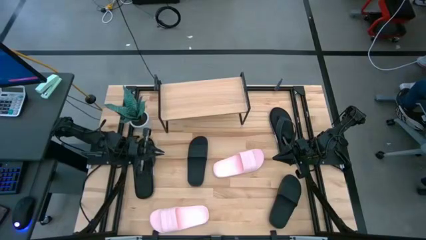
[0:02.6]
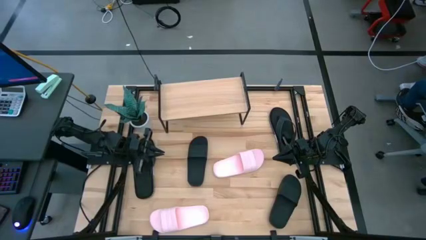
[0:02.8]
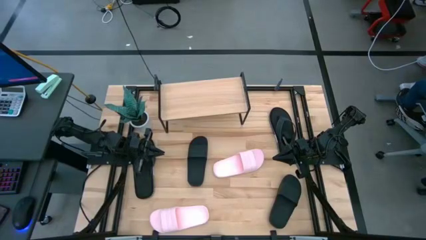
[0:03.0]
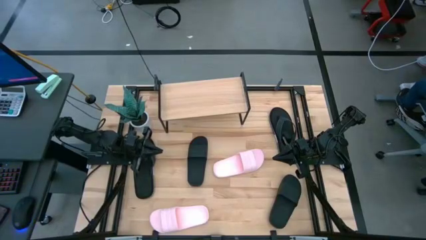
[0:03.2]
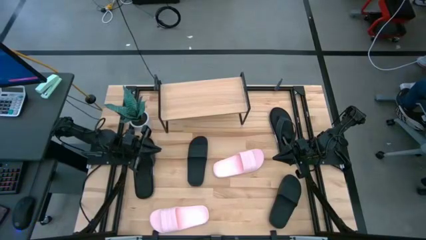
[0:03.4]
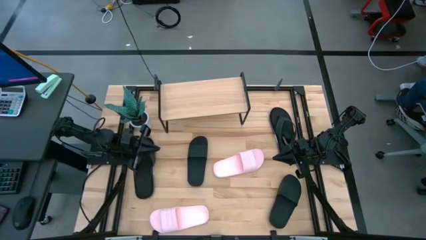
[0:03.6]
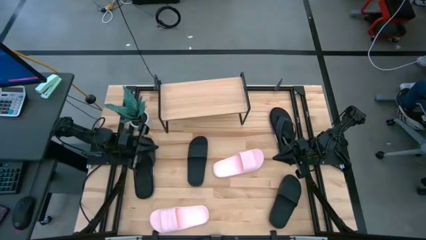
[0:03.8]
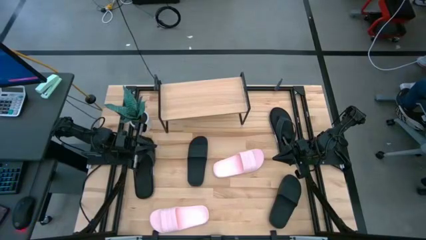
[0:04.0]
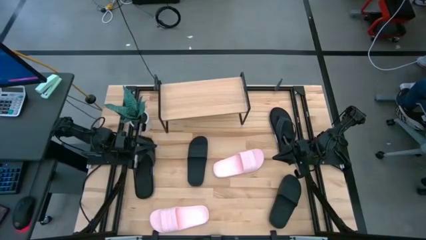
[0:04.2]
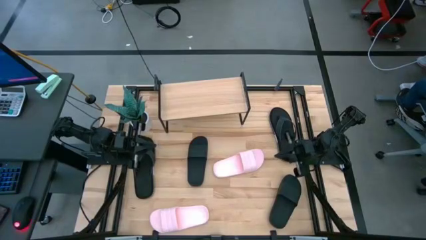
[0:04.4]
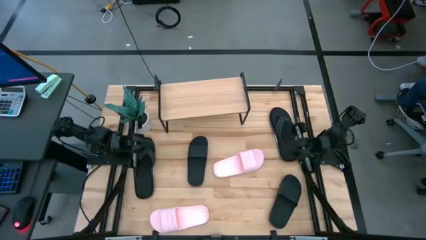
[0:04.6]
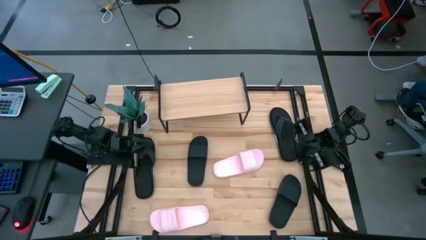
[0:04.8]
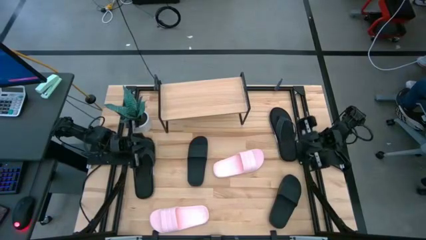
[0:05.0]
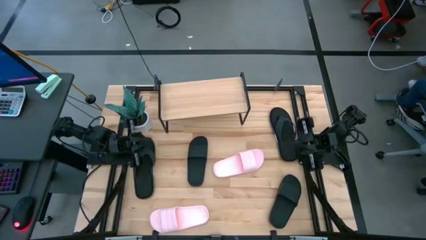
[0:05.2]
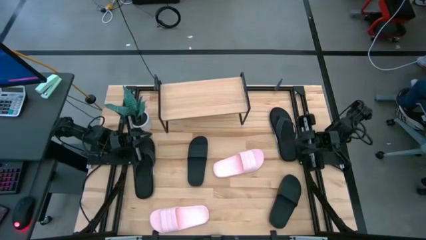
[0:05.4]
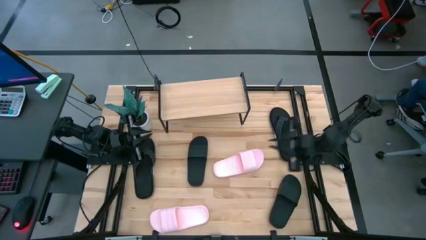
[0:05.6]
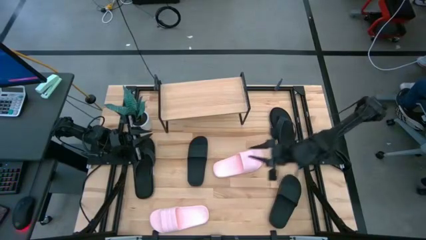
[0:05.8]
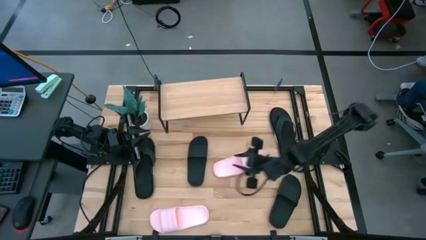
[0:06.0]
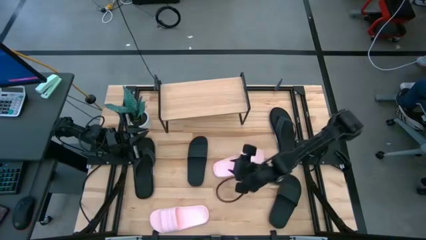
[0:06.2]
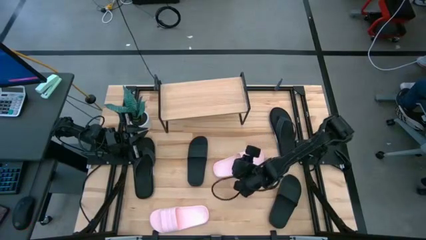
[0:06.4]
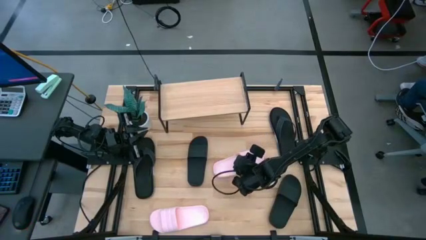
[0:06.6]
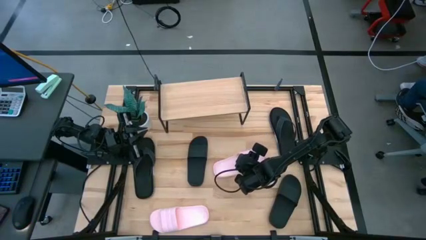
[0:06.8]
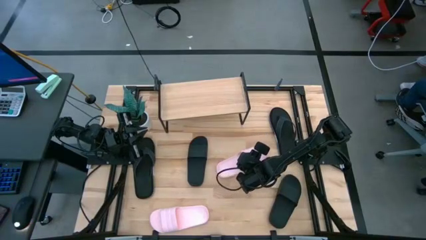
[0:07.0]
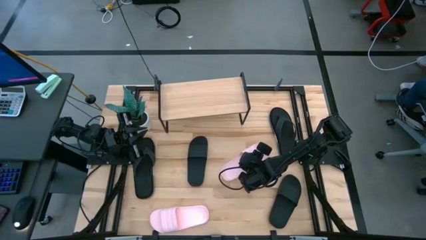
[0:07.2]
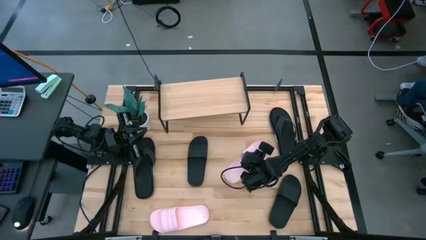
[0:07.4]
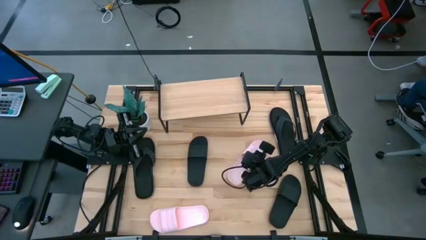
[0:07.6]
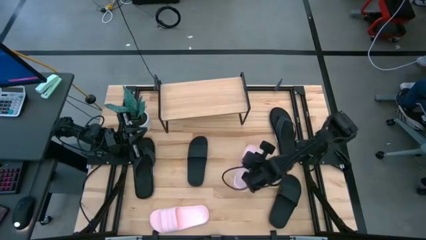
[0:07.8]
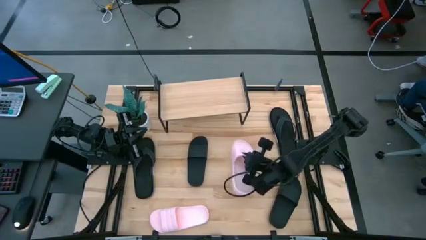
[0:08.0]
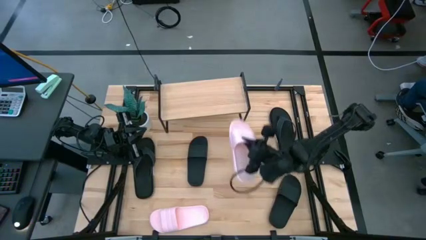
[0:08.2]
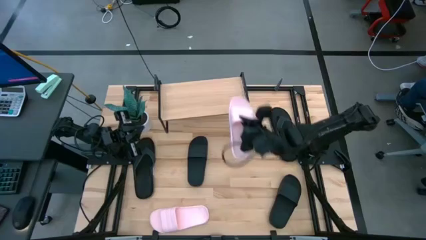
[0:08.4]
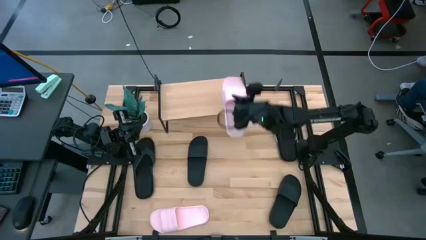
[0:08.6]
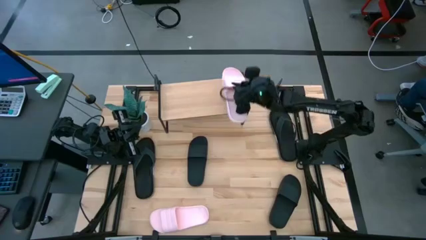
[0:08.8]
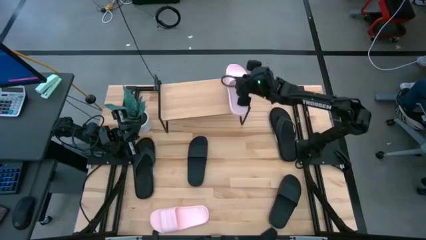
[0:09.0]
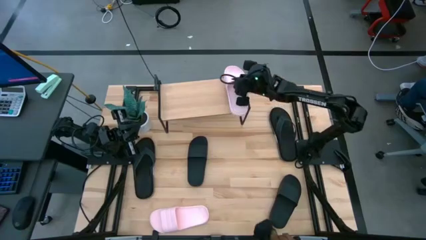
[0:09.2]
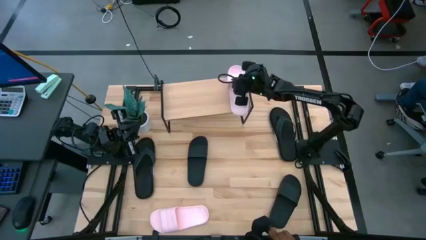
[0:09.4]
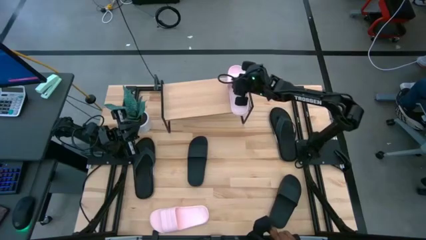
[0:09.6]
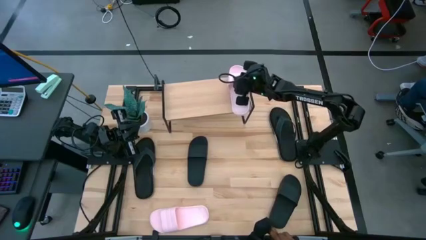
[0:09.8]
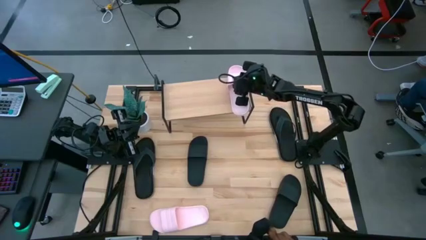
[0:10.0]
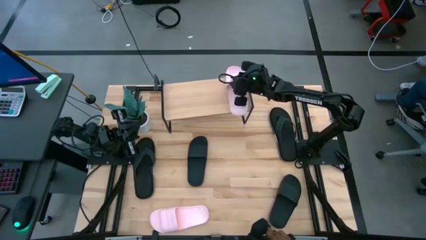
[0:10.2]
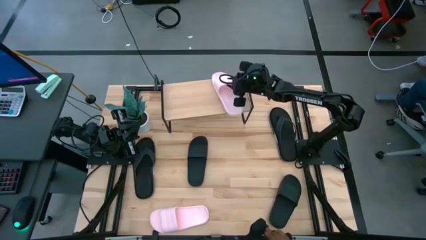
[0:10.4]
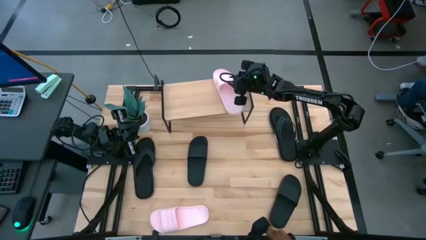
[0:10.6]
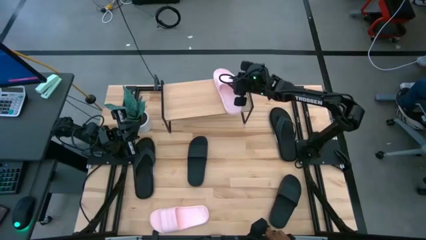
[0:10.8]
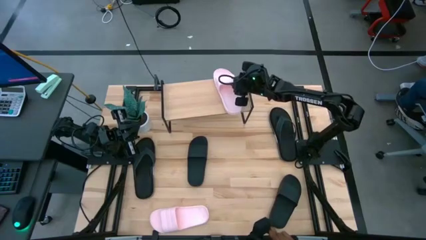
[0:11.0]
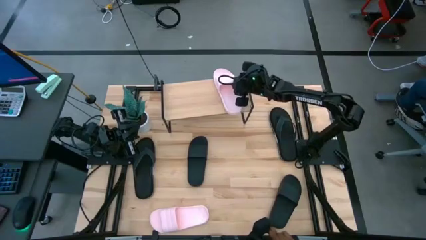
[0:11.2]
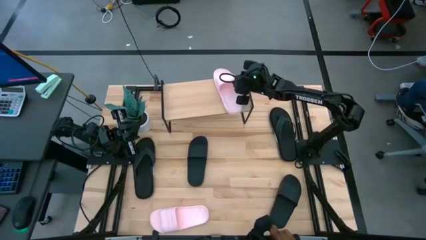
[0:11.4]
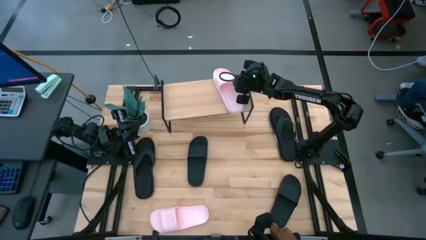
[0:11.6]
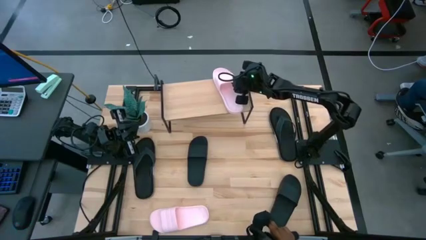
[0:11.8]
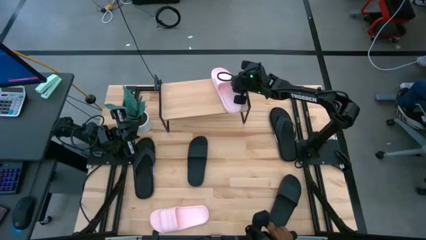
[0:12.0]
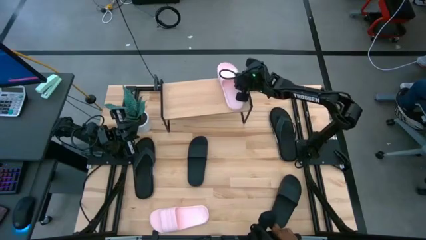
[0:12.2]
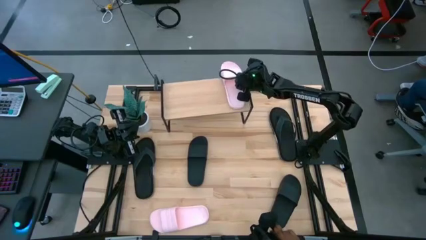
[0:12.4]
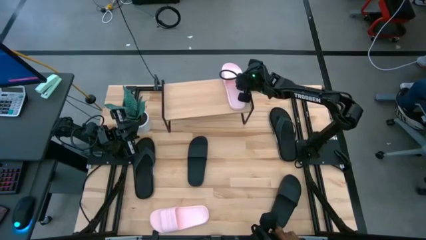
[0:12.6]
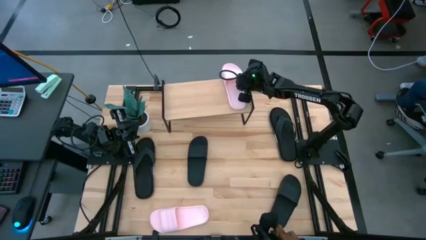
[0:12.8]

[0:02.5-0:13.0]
Task: Pick and place slides into the shelf
Put the right pink slide on the shelf

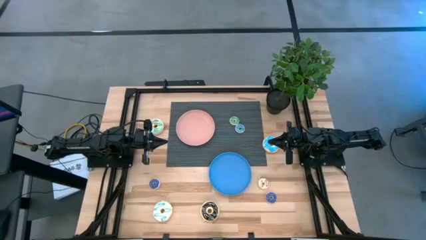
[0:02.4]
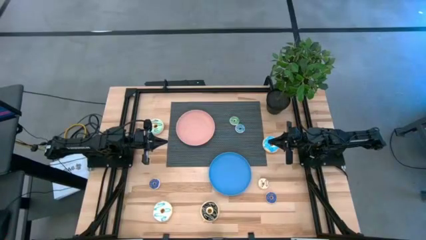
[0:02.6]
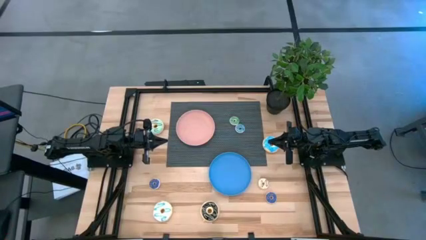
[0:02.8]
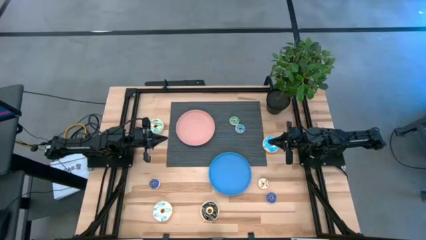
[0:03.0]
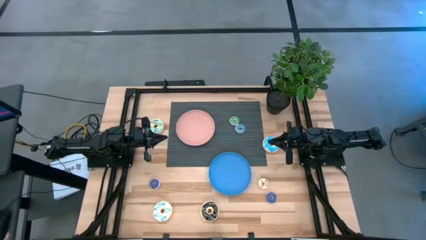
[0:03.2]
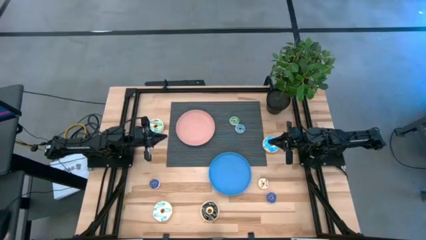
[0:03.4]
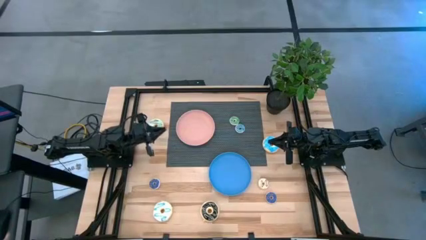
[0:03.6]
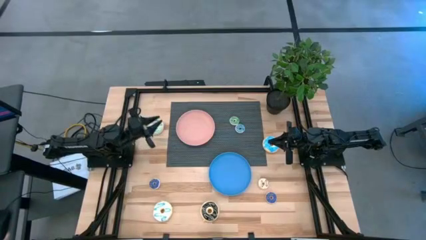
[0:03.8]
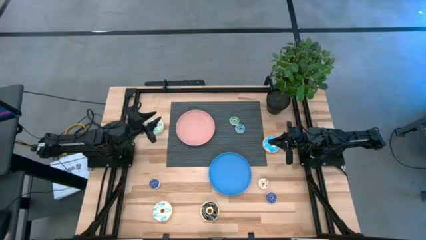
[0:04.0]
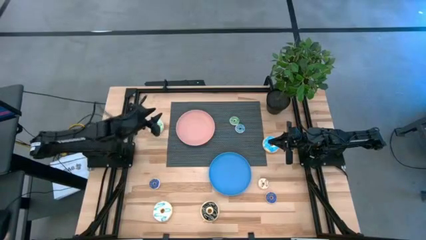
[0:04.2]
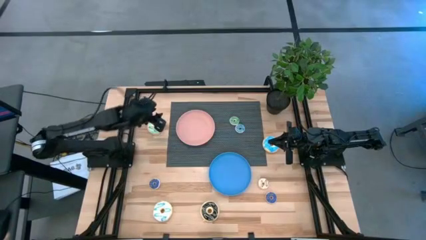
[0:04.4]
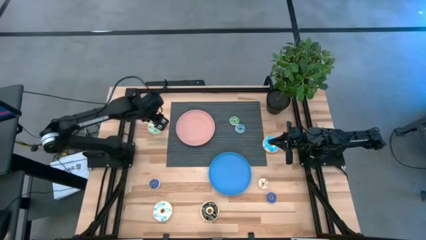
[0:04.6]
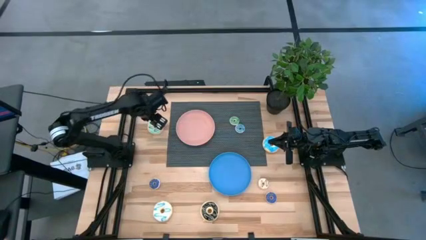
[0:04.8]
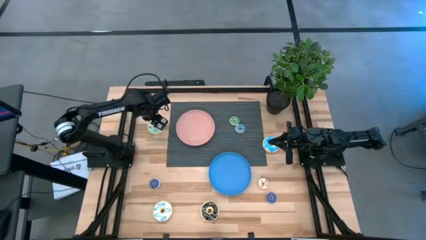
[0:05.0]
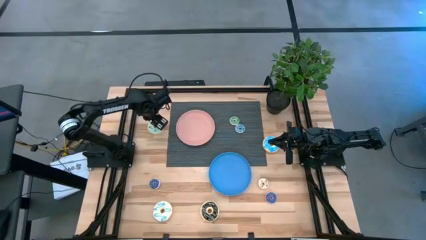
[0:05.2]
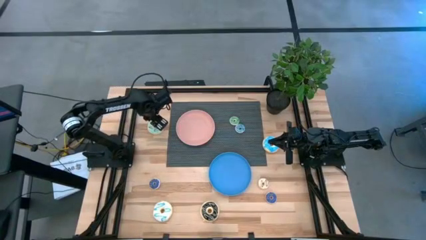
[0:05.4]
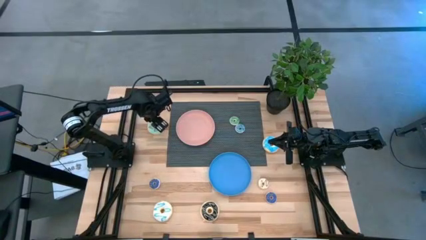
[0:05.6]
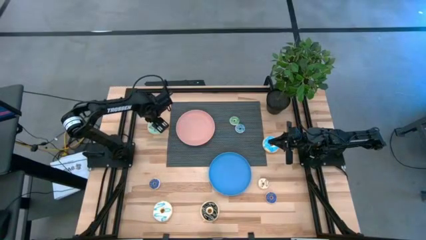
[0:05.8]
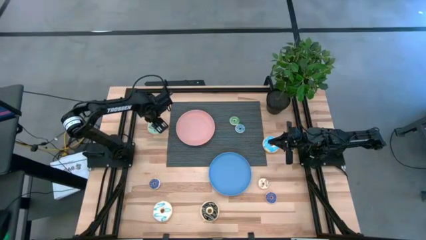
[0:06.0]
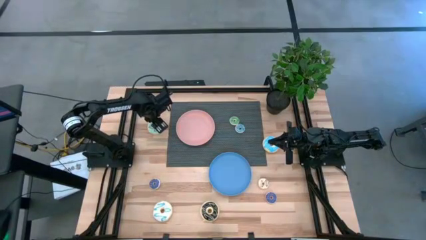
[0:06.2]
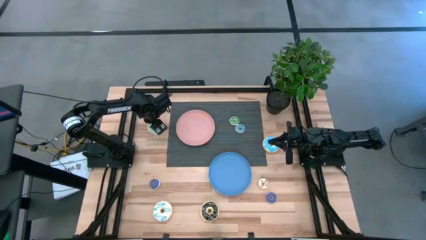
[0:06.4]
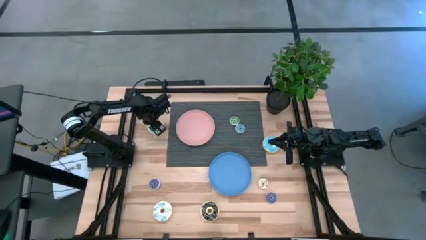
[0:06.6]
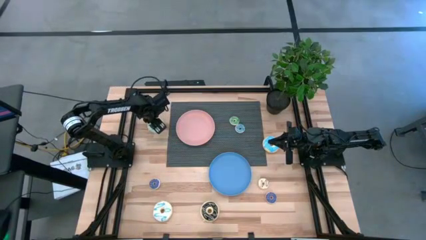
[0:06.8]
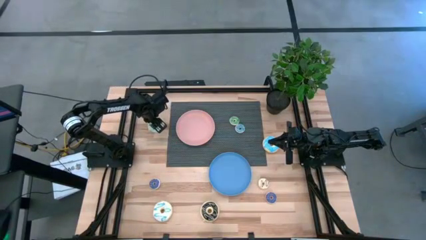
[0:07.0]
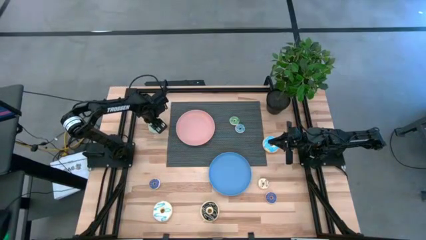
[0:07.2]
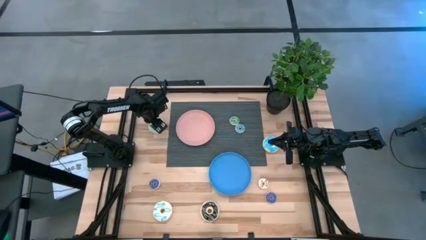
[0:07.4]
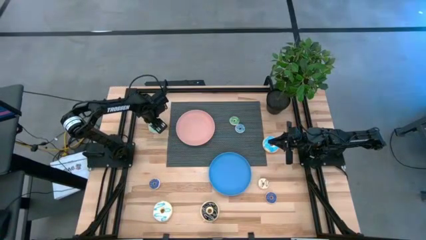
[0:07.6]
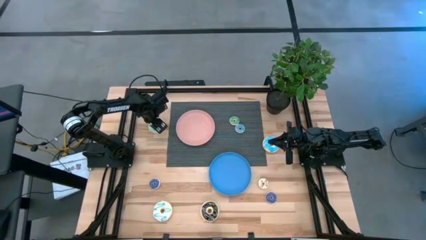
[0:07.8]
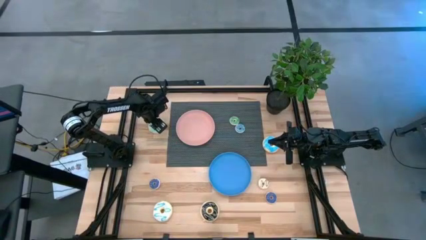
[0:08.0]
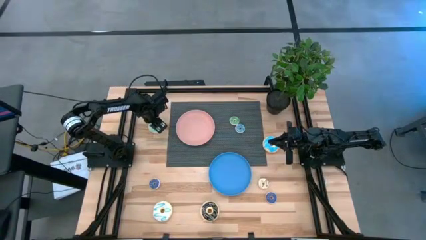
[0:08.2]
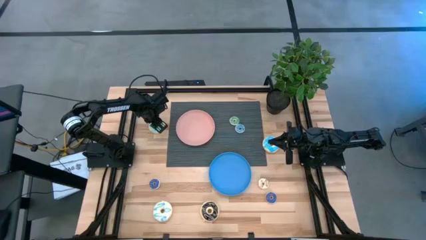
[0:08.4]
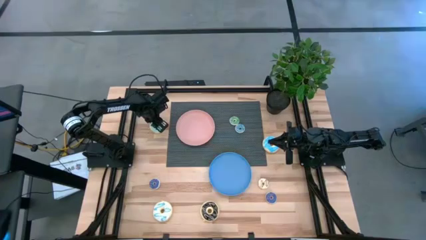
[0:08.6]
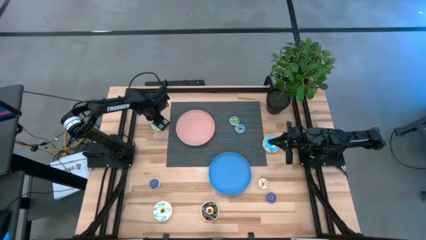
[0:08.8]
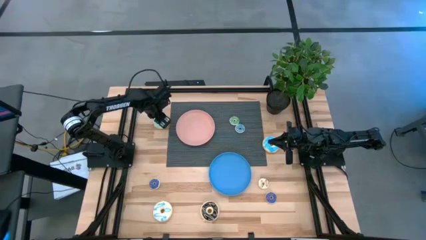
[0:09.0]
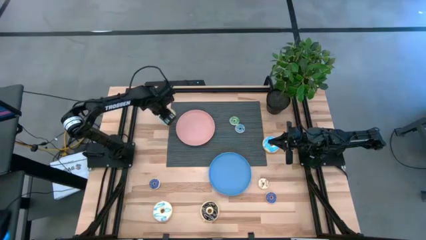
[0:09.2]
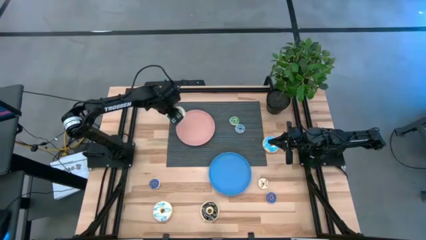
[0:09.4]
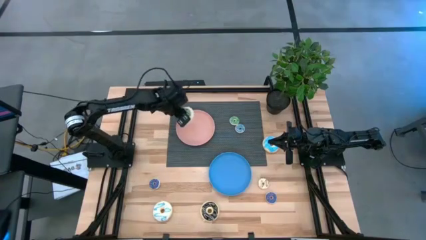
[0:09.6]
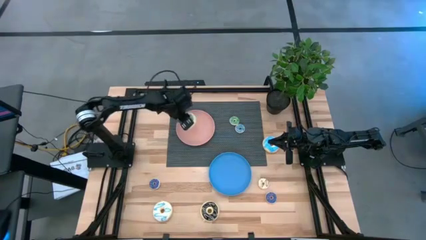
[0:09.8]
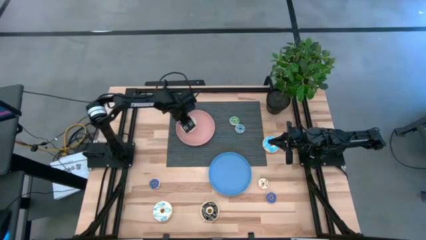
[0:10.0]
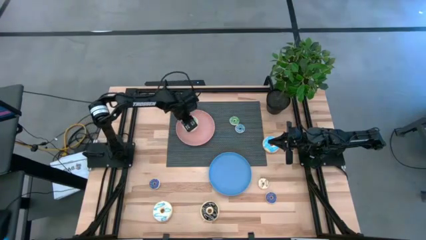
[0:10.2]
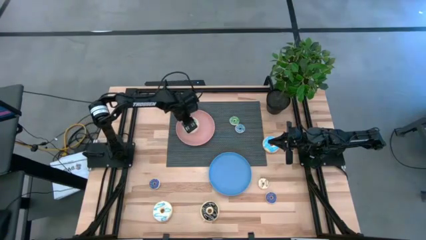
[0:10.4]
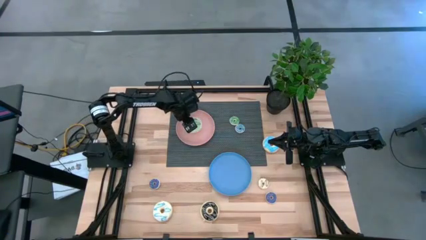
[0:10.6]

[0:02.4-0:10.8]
Task: Pick & Place donuts
Put the large blue donut into the pink plate
